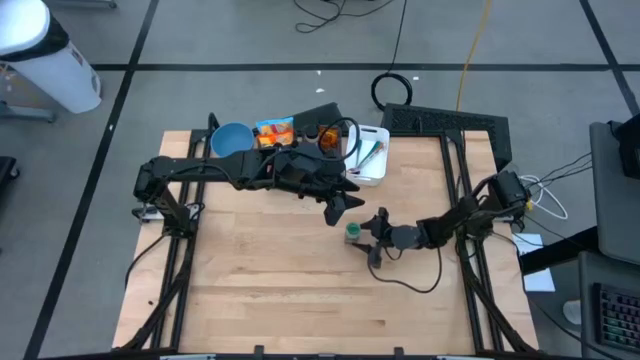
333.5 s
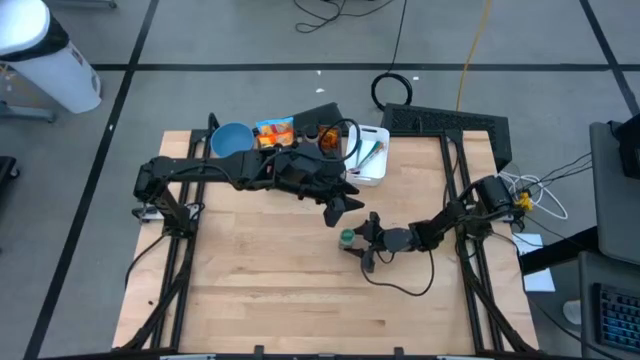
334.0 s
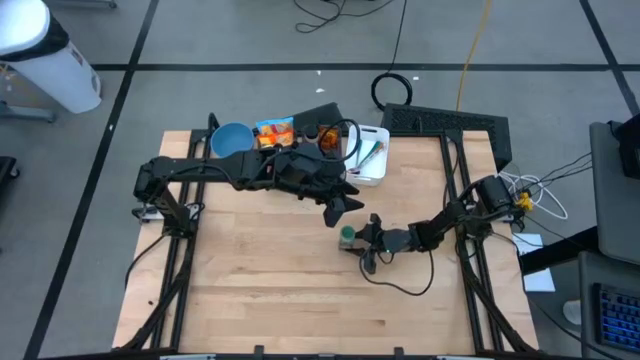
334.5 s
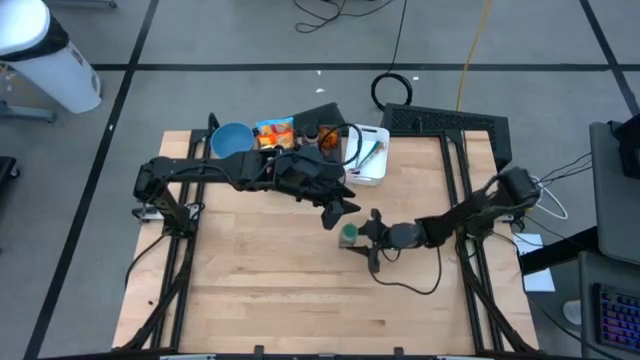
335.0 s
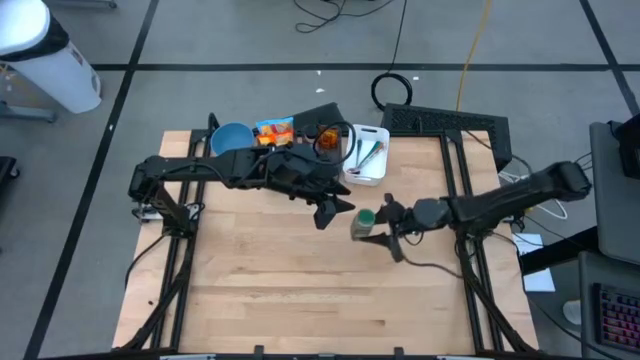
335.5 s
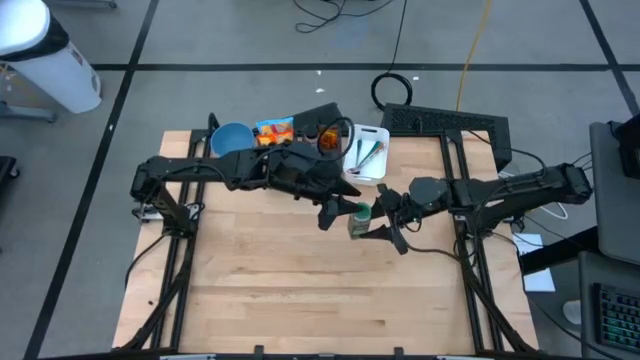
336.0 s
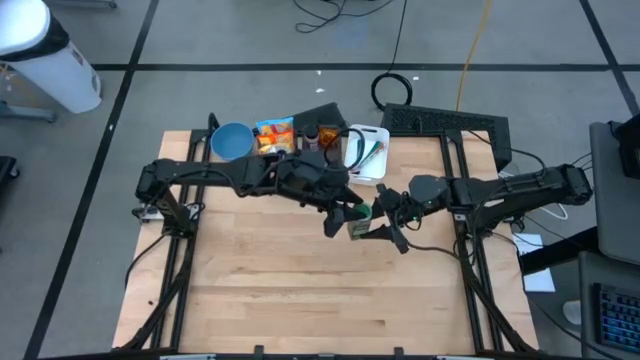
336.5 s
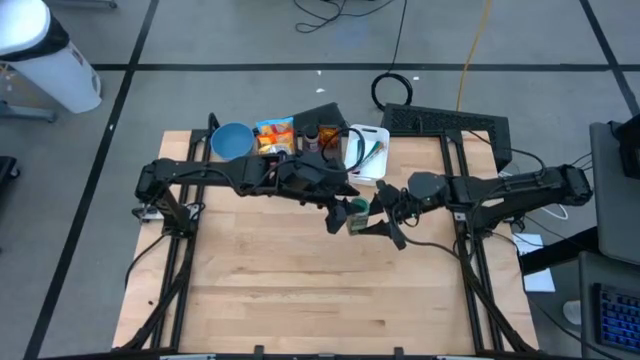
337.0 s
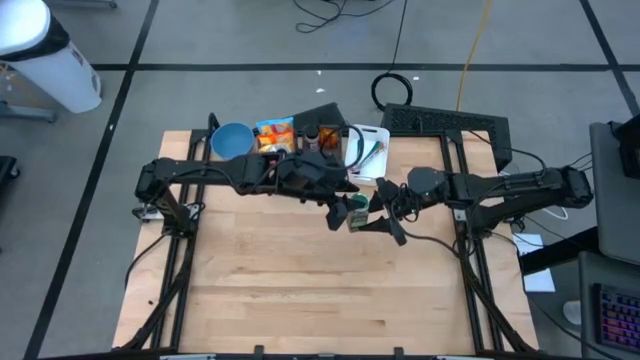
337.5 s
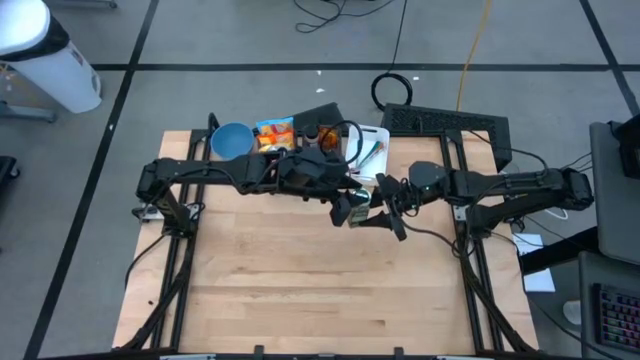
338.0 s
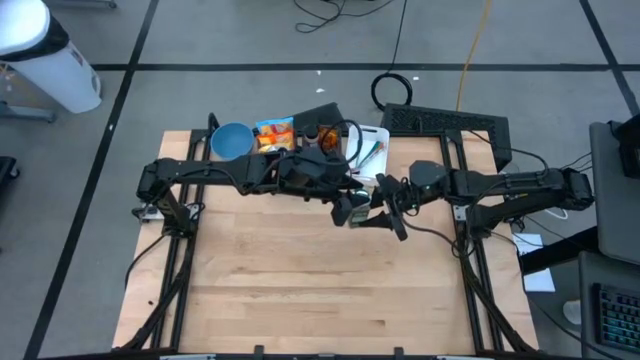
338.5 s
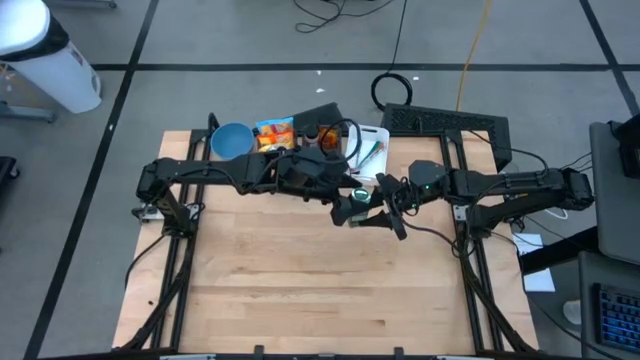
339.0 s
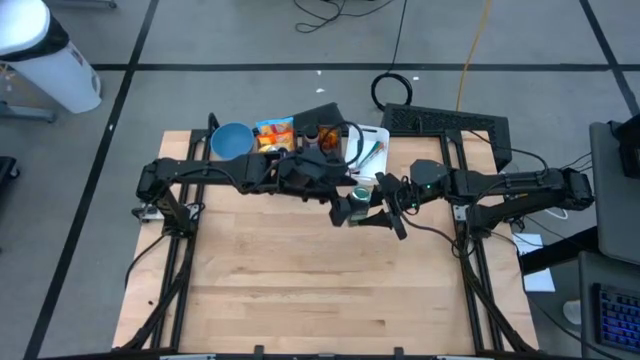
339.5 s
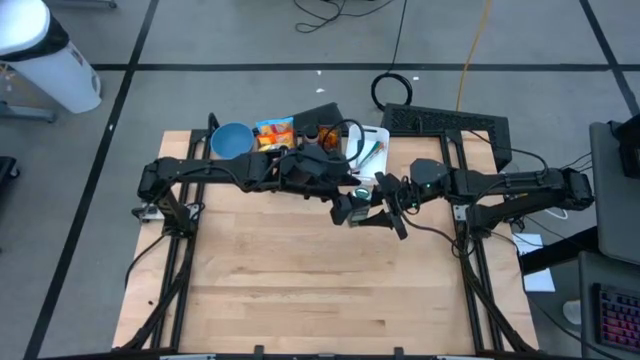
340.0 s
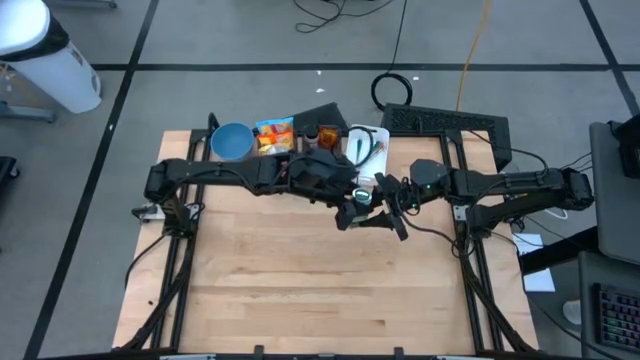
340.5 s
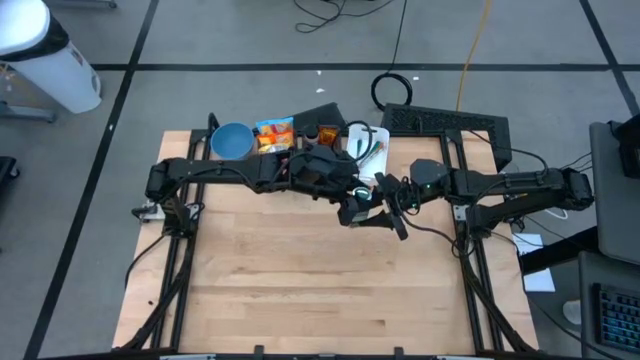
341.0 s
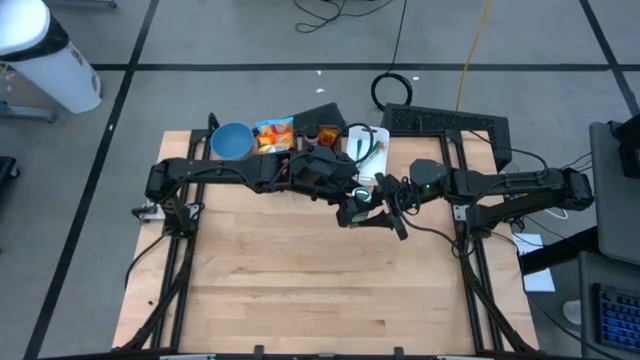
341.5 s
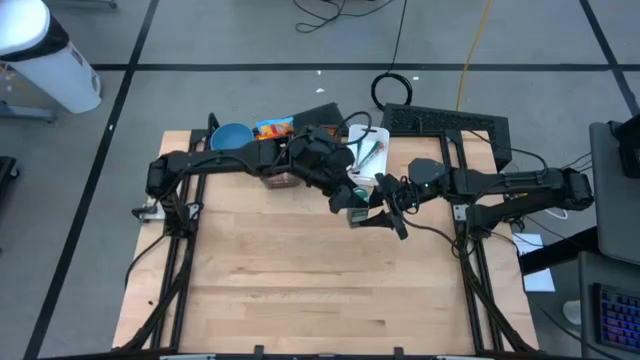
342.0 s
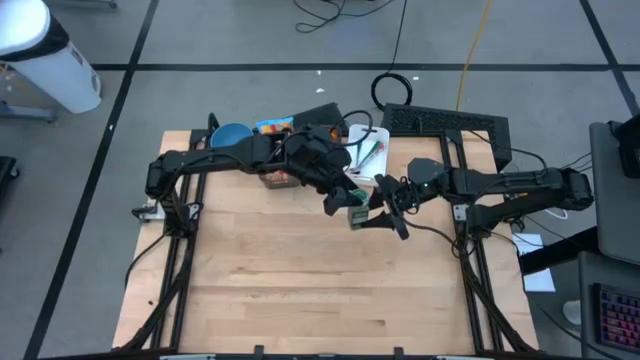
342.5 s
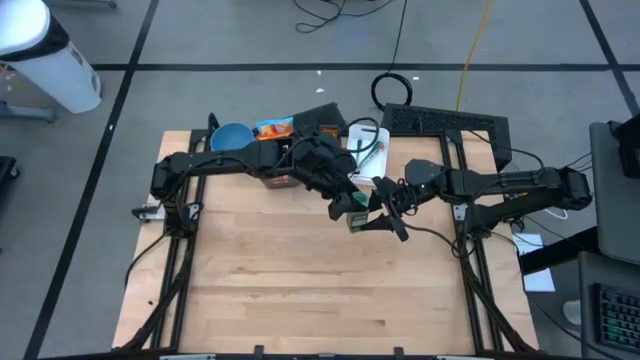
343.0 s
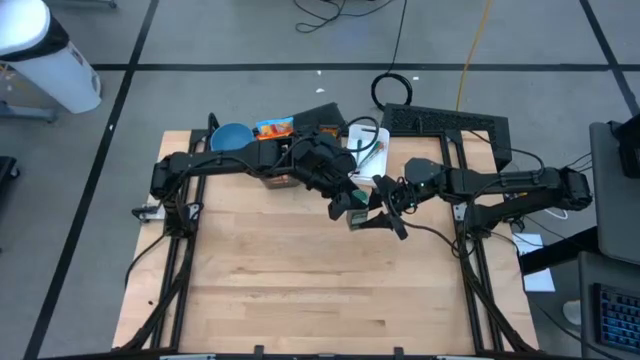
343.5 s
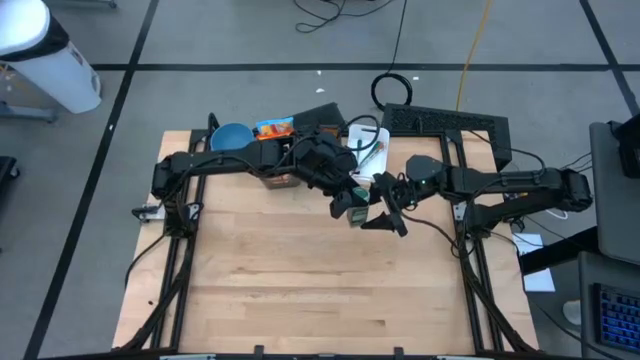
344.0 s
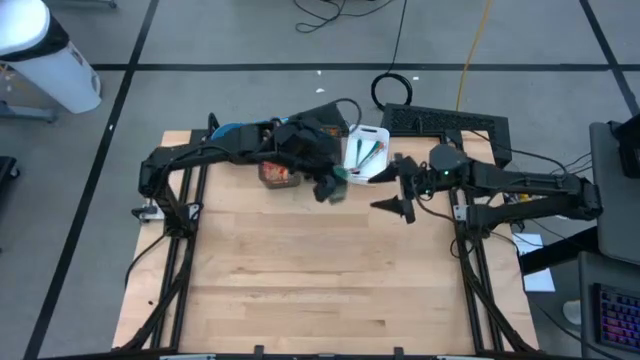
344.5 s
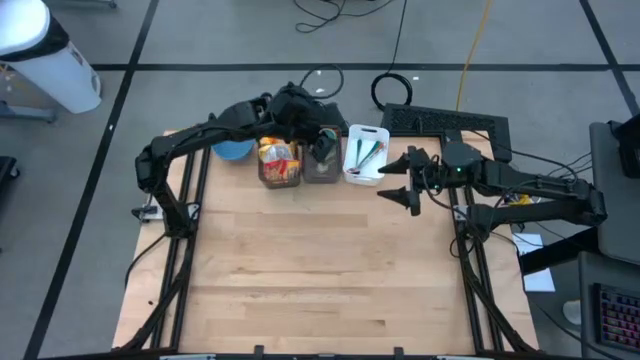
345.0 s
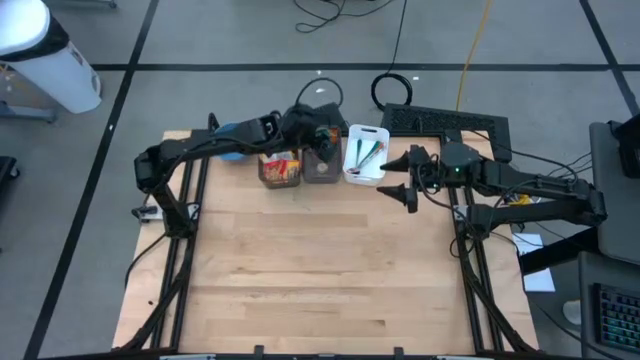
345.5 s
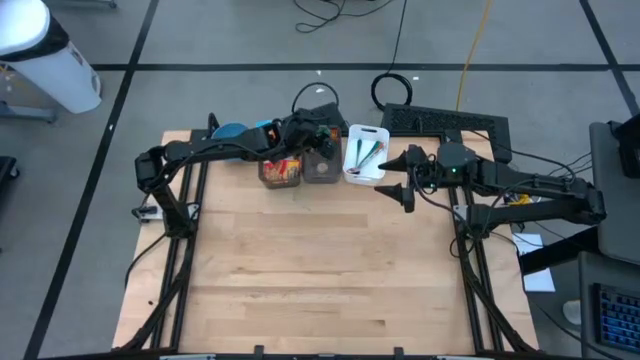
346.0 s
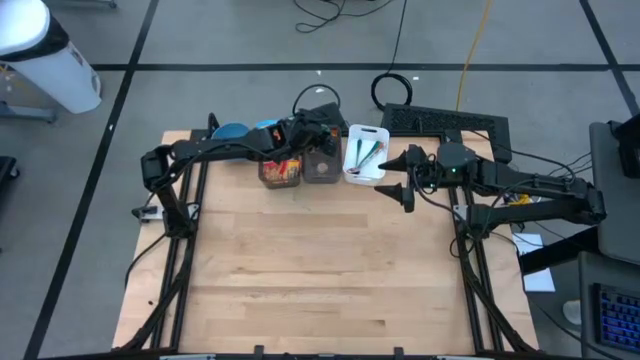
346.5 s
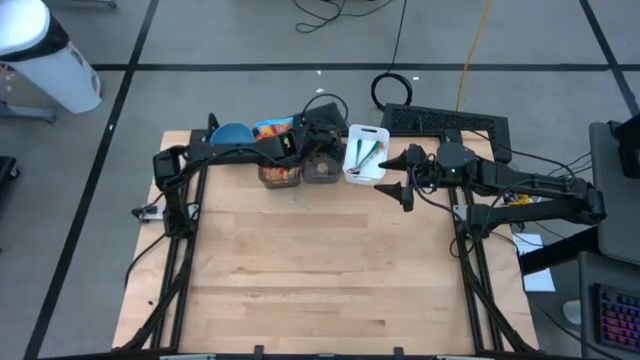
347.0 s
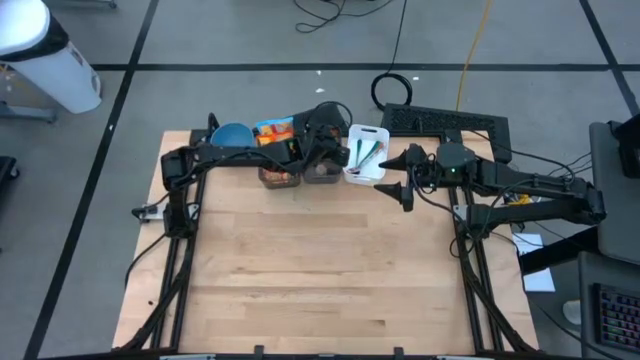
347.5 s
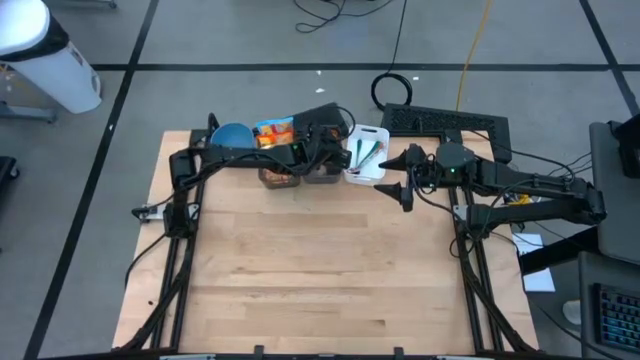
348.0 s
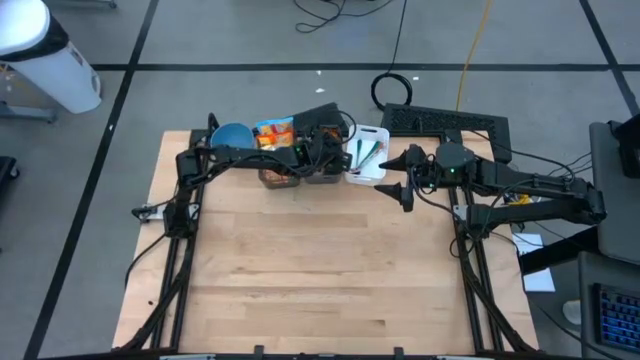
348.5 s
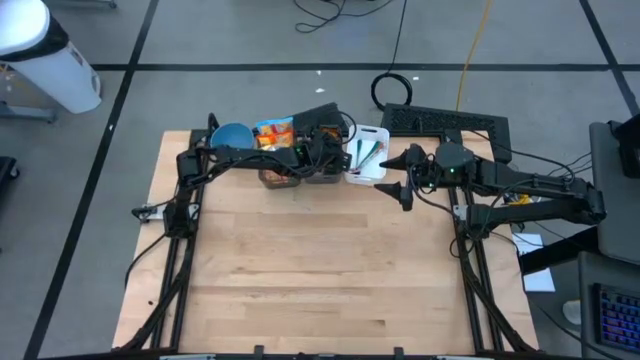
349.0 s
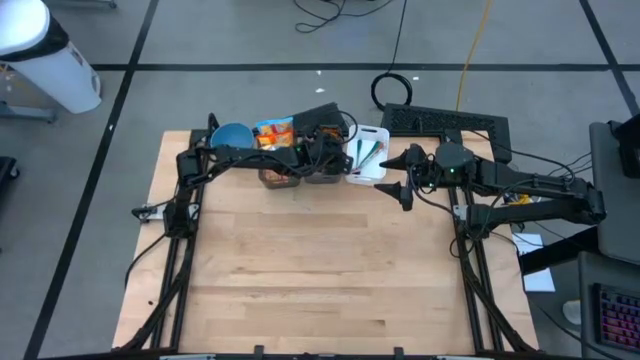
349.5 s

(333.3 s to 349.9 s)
Task: Pick & Place Food Item
Put the green seasoning bottle into the right black bin

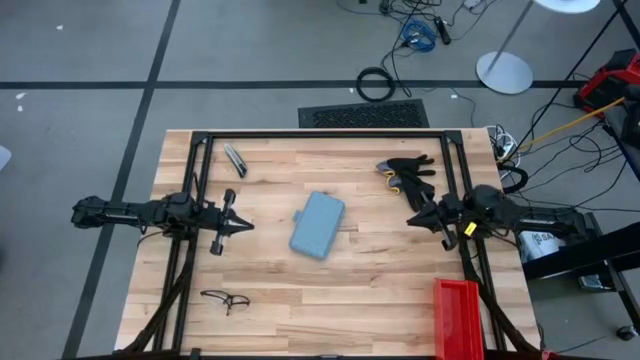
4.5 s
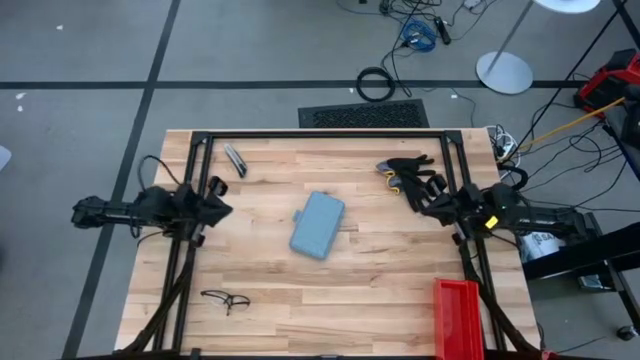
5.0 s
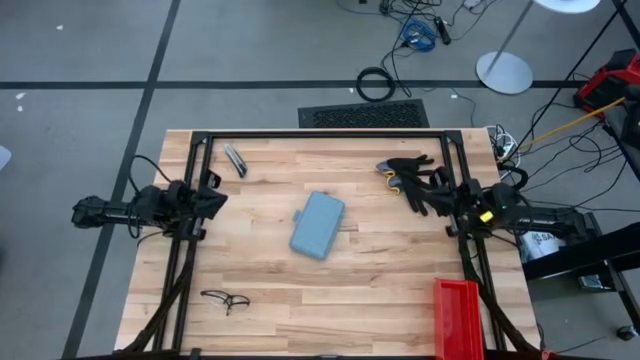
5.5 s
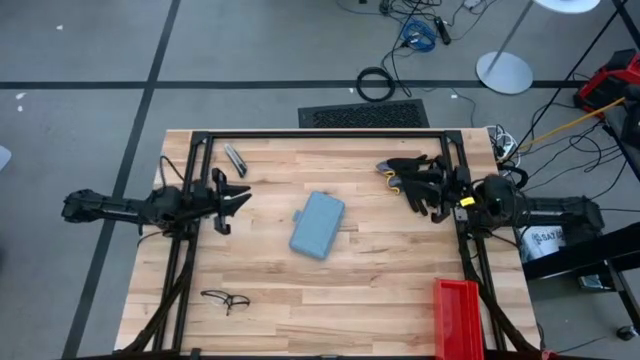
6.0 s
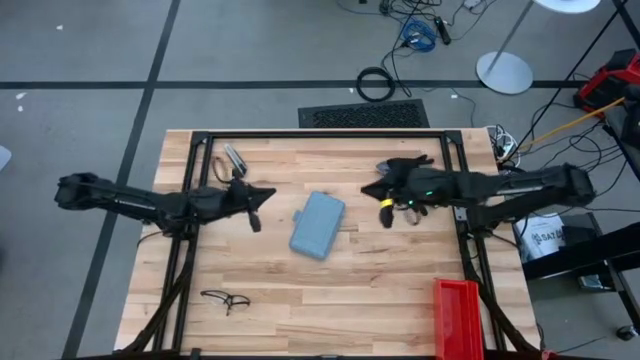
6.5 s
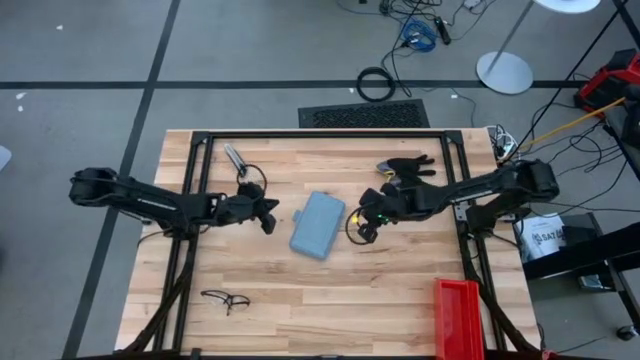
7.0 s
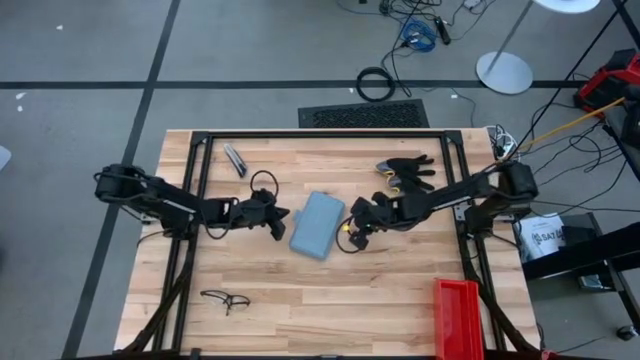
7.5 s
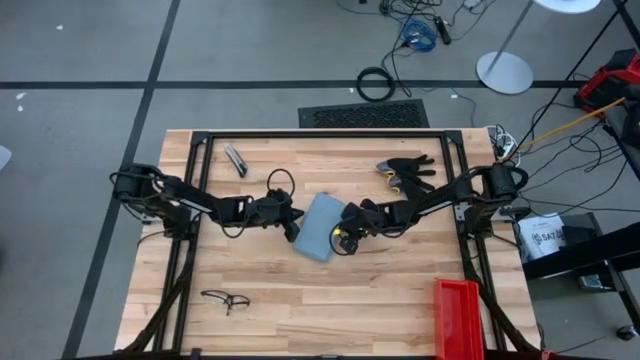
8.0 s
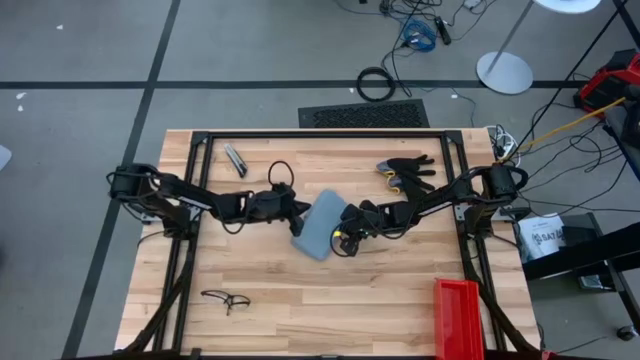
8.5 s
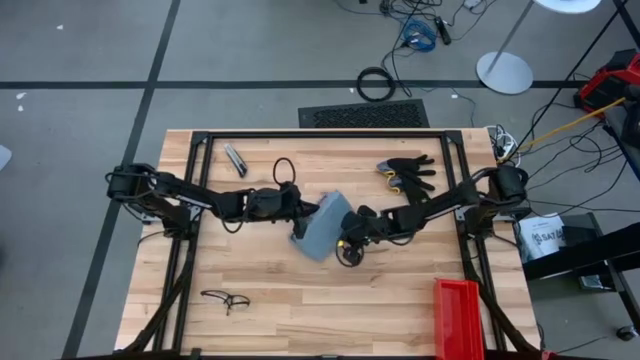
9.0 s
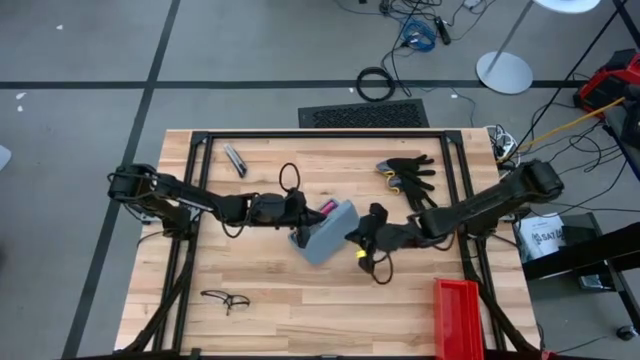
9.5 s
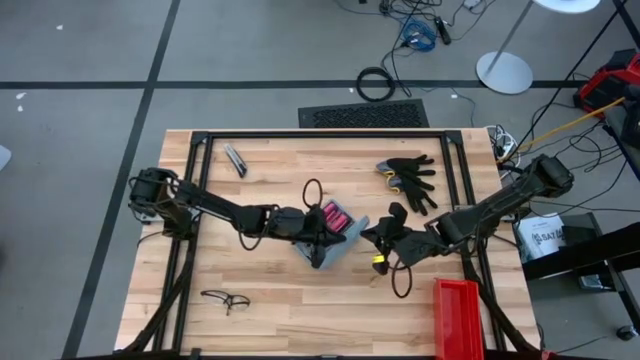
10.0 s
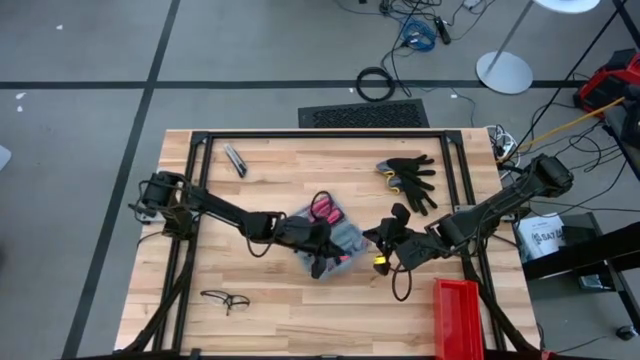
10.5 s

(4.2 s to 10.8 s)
Task: prefit tool cases
Open the gray prefit tool case
